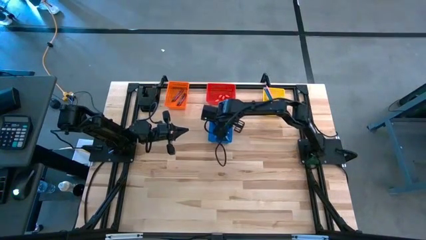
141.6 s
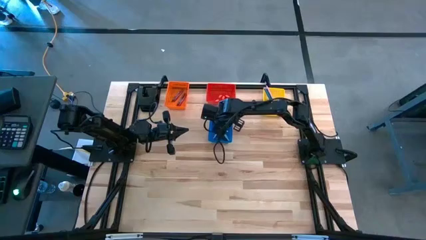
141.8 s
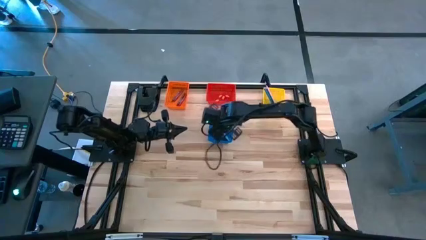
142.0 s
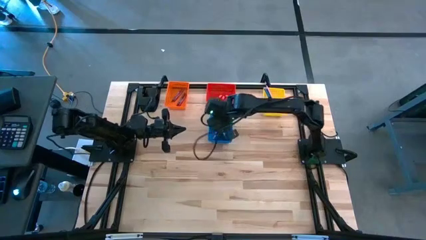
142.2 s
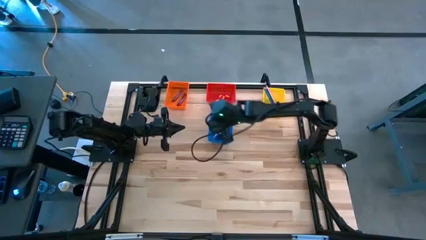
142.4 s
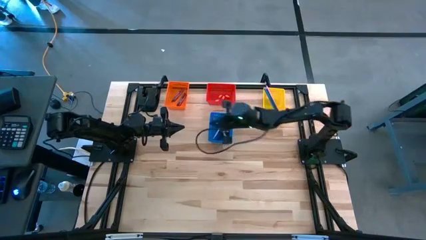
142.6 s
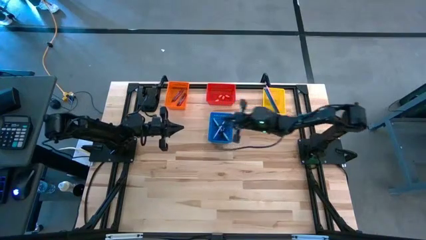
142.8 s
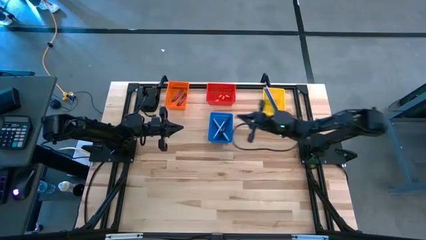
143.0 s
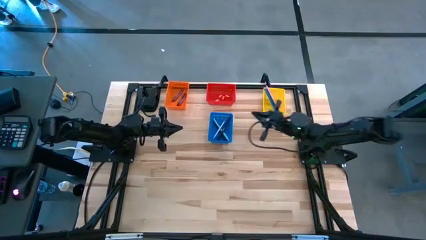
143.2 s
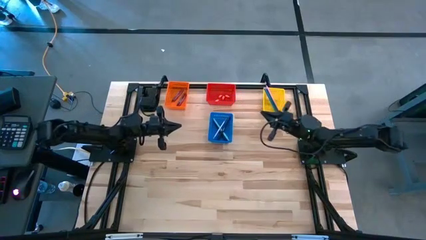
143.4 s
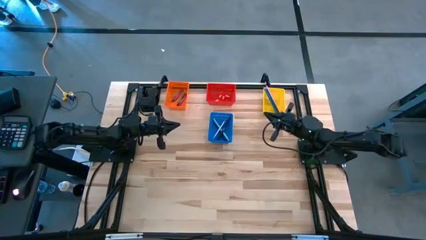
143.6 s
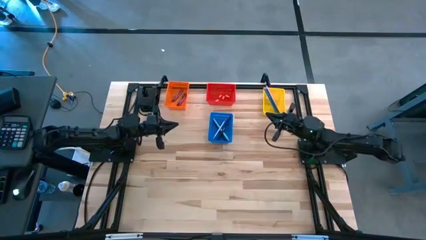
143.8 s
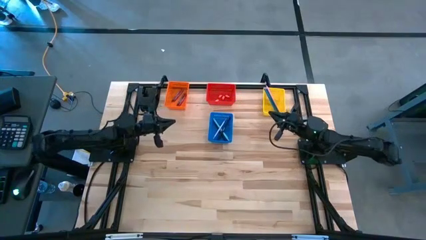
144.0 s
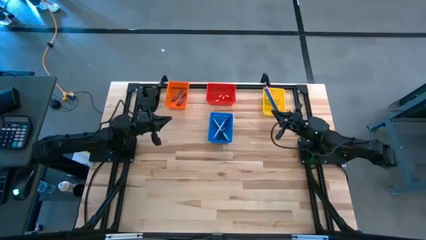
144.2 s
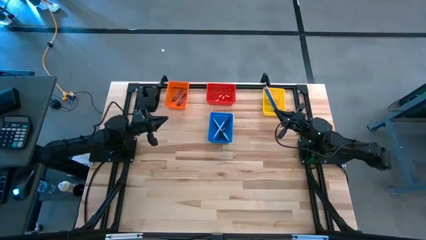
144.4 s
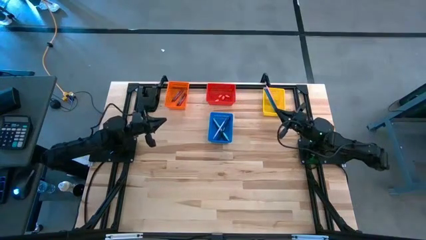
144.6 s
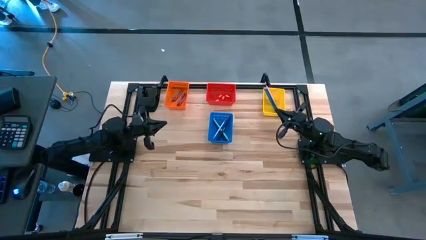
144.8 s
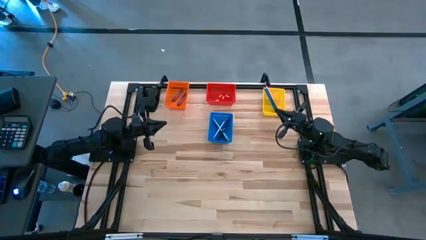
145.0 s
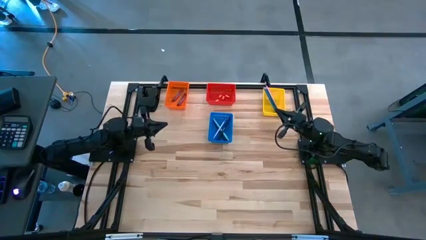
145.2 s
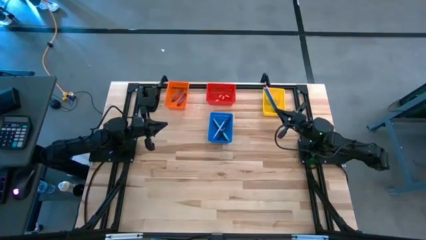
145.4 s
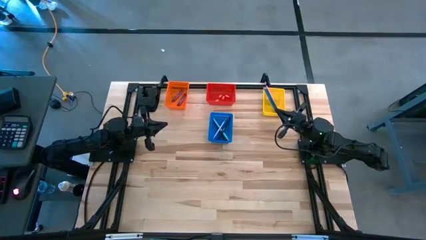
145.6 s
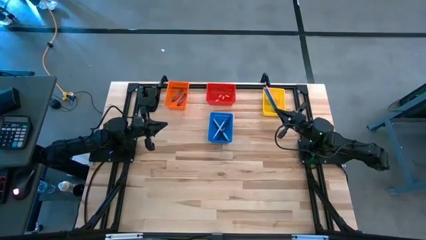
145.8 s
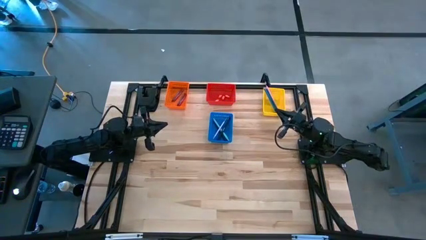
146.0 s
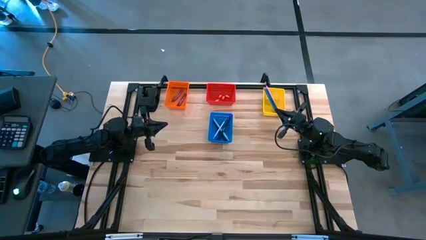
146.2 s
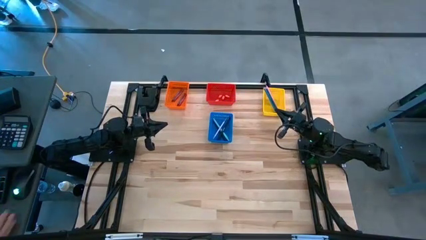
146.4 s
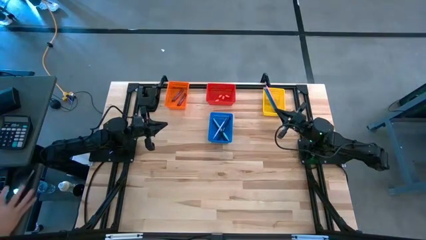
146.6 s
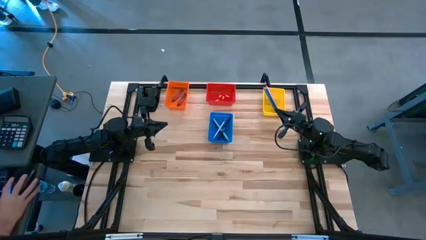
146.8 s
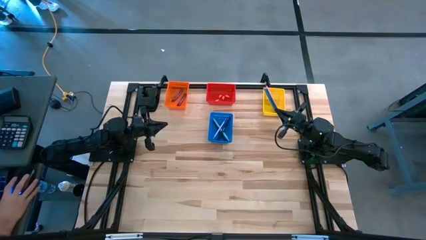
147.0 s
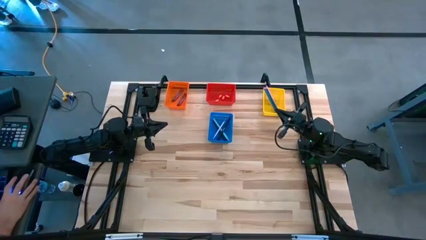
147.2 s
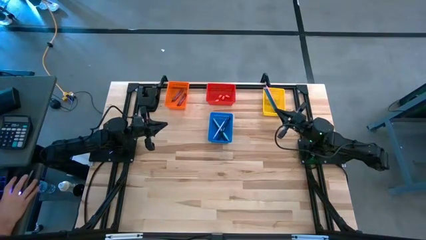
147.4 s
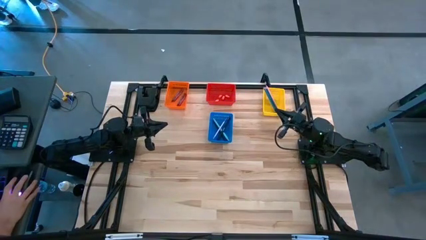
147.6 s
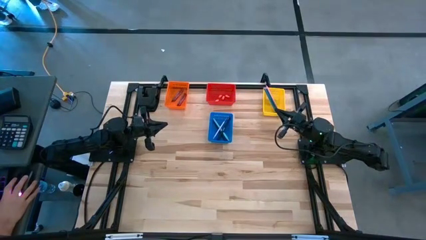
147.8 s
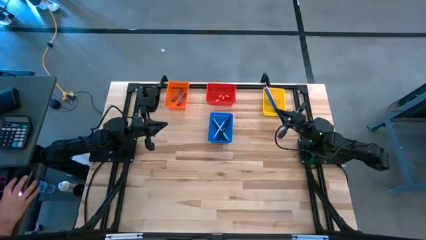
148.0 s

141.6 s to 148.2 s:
Task: Sort crayons/erasers/pens/pencils in bins
Return to Home Position

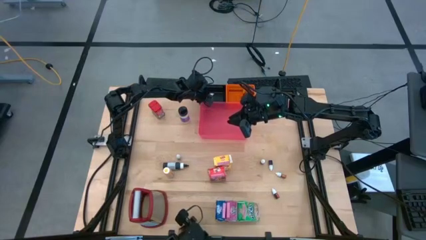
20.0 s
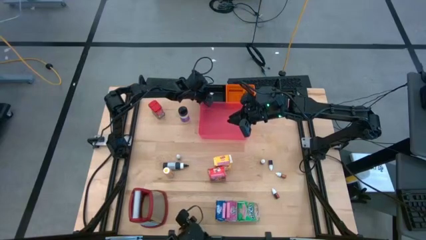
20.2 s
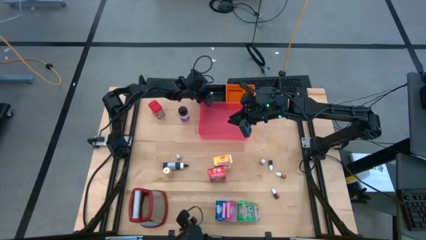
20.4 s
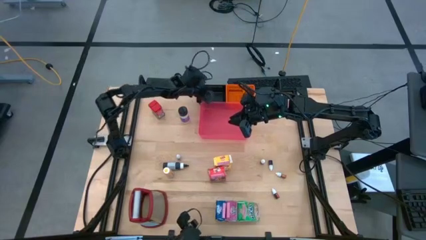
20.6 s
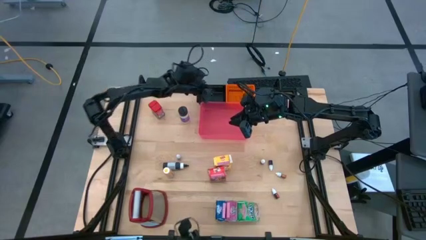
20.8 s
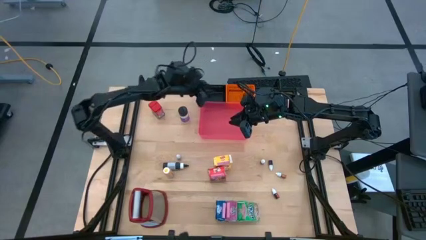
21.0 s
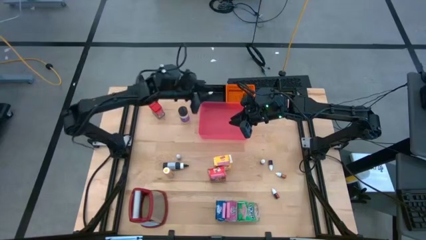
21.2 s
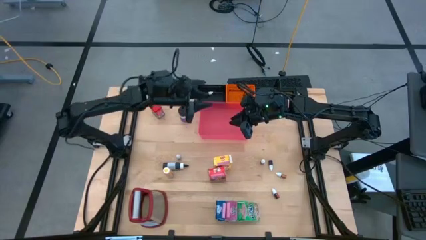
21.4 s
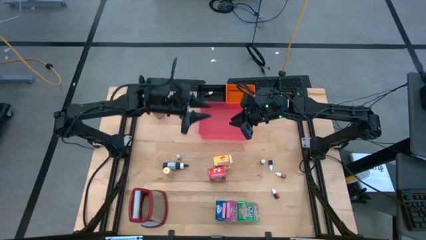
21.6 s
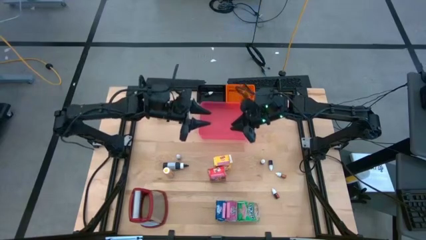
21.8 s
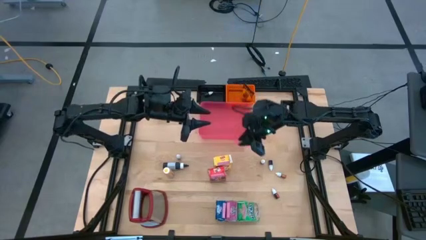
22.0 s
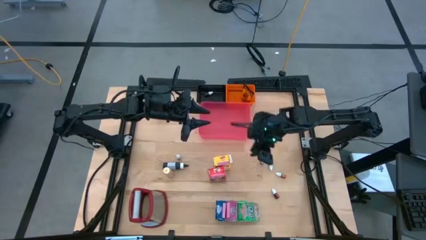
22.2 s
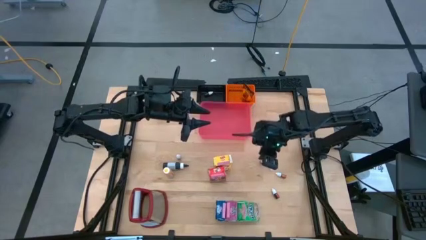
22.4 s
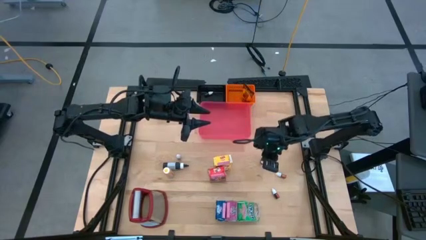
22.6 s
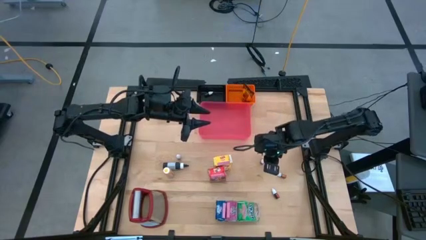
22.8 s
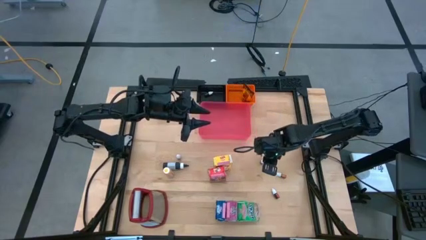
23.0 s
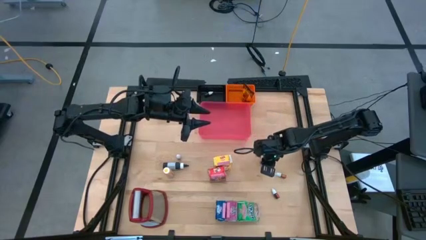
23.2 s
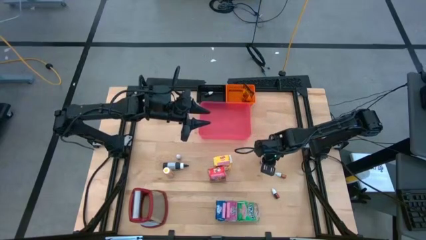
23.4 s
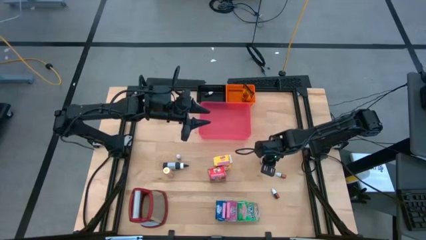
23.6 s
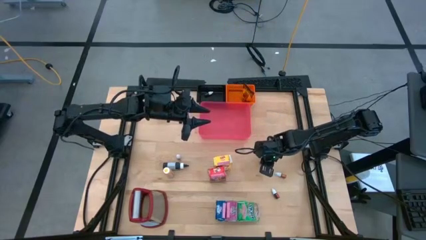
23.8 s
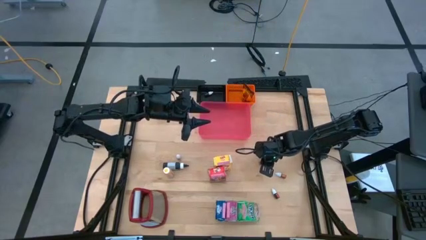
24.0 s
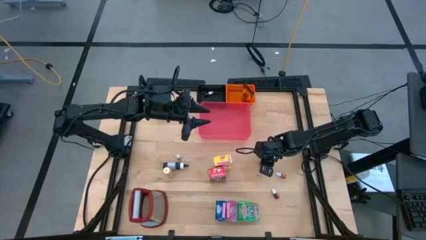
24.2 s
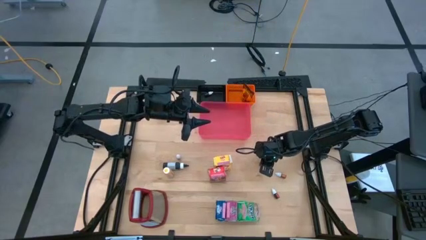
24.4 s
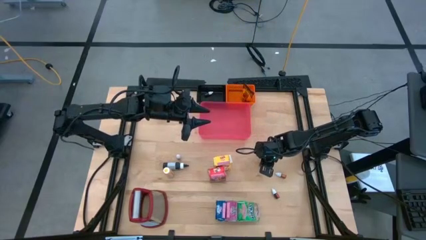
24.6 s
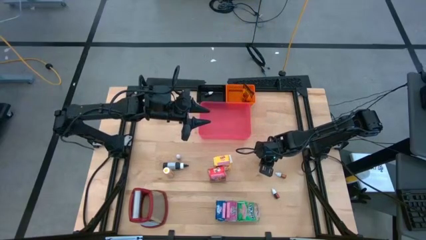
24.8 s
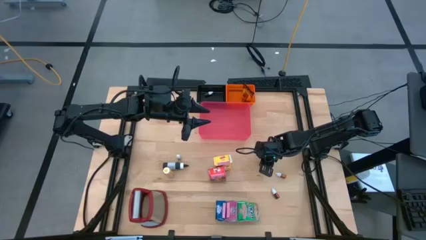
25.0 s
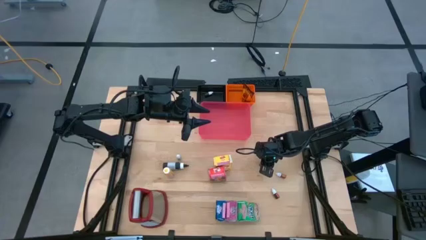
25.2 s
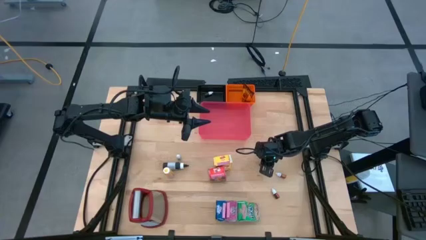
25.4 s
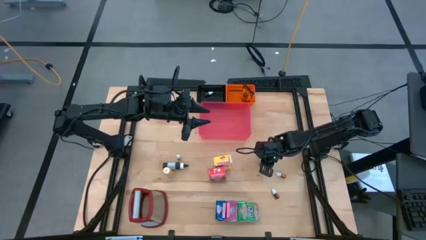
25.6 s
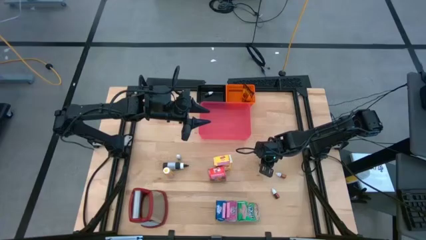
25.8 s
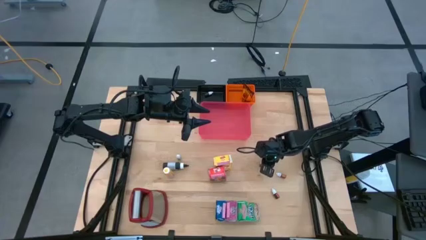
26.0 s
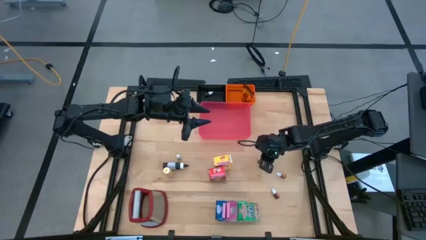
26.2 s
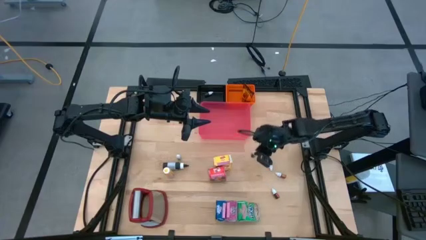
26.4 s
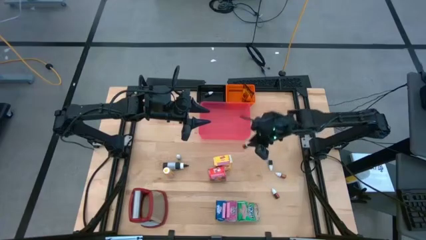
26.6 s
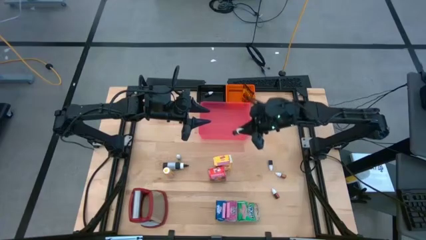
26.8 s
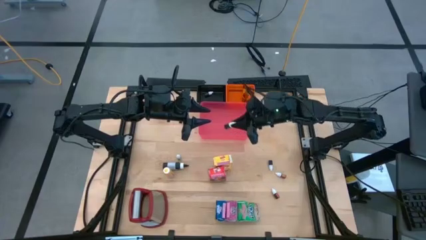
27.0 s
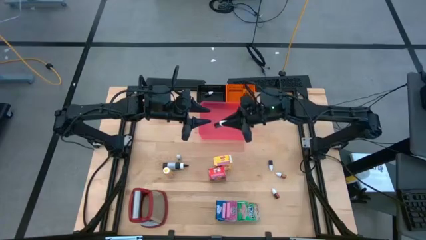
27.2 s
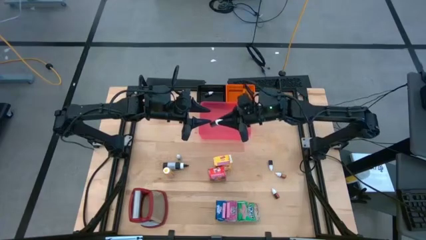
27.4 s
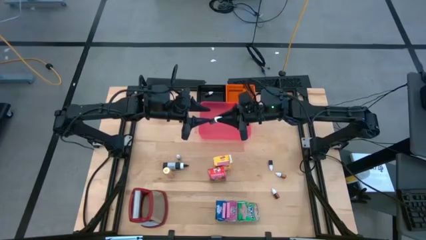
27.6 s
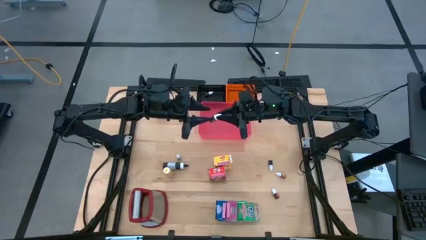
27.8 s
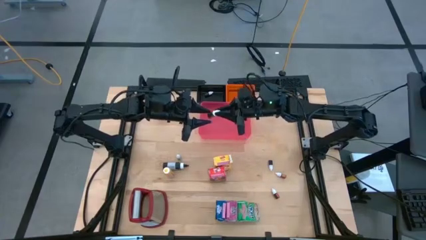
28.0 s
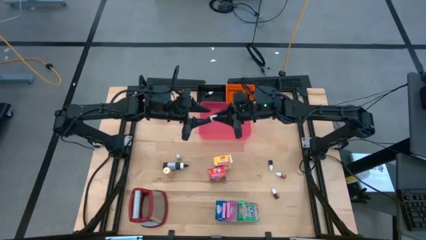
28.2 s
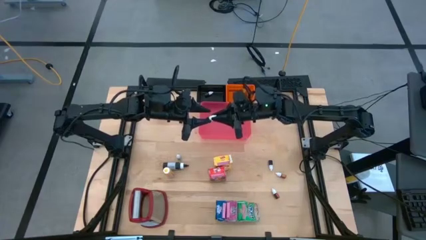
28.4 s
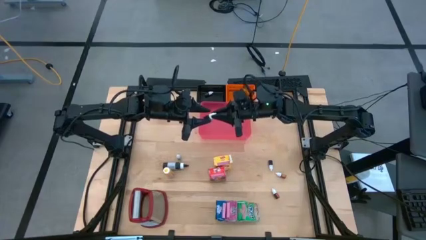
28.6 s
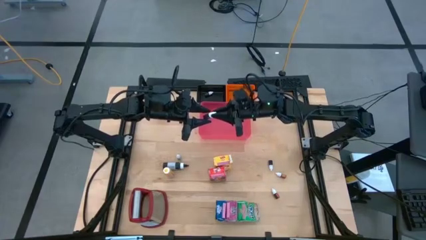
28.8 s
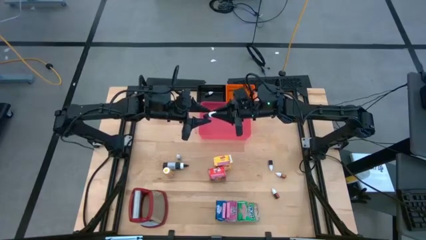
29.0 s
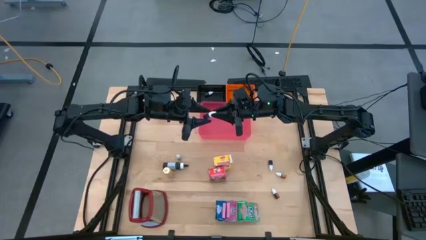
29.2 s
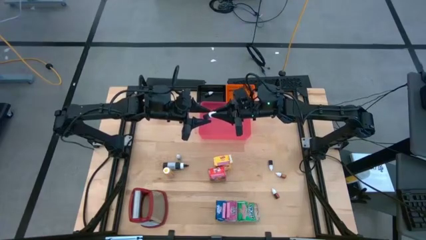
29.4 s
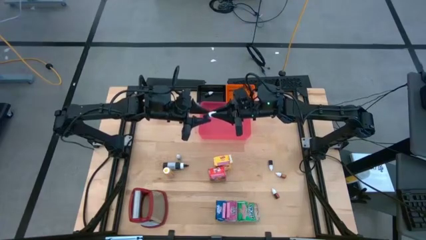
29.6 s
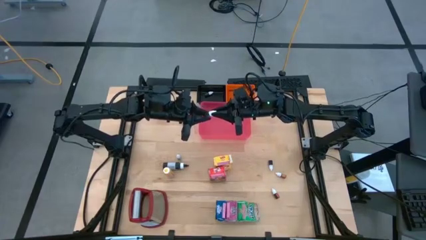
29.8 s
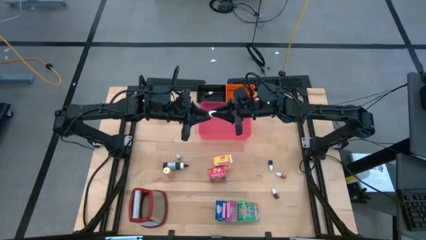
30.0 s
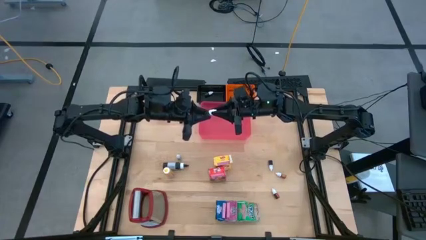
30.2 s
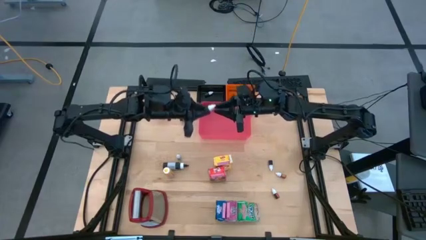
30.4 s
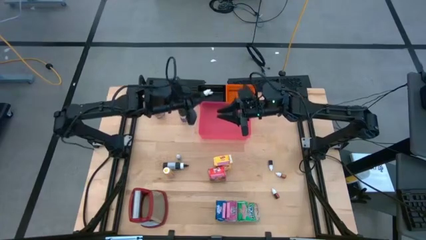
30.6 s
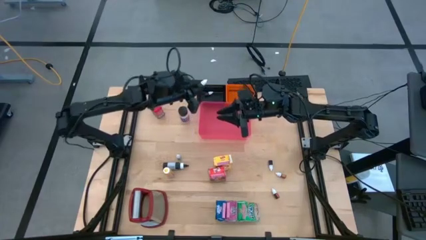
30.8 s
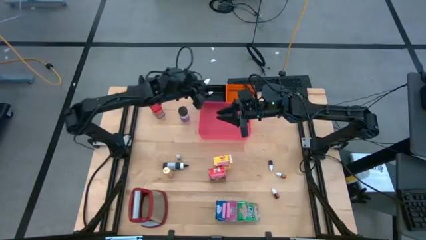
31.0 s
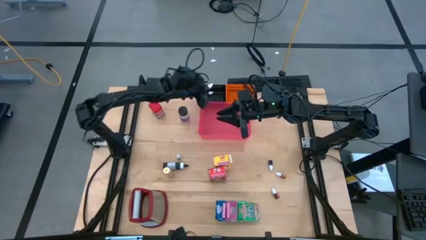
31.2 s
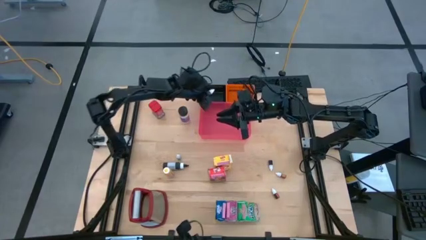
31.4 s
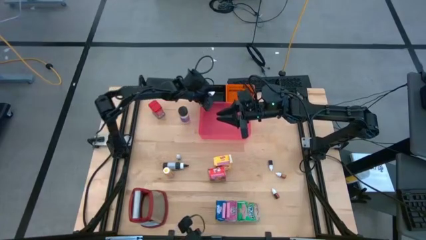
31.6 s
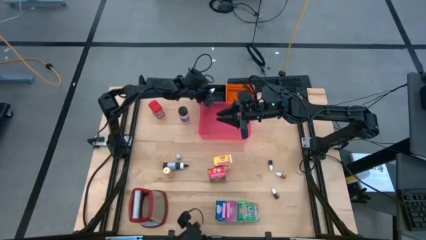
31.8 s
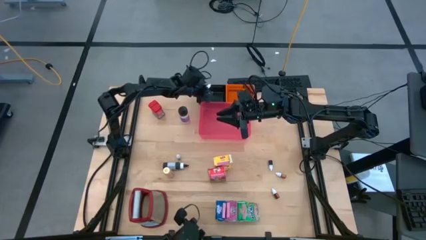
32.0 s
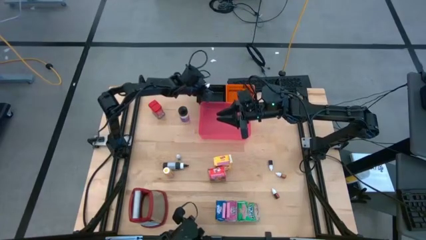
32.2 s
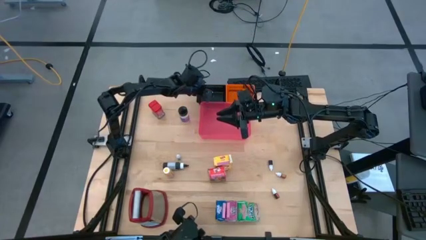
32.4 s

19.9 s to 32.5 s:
Task: Pick & Place Kitchen Items
Put the small brown food coloring bottle into the black bin
